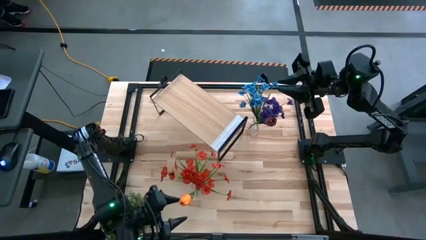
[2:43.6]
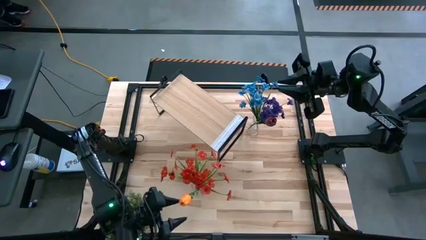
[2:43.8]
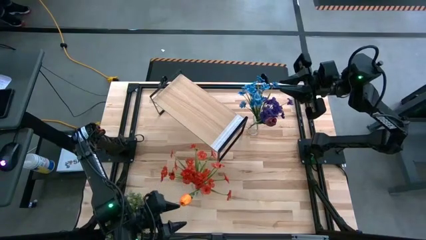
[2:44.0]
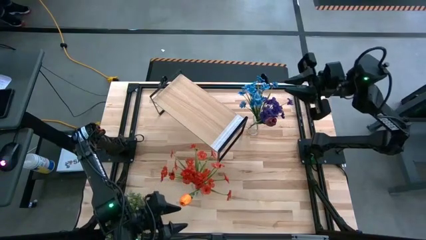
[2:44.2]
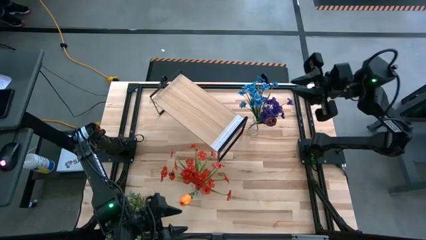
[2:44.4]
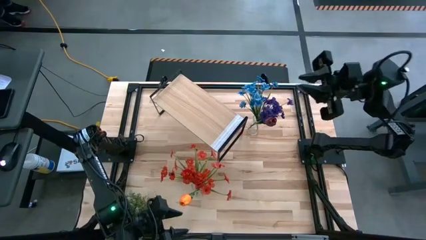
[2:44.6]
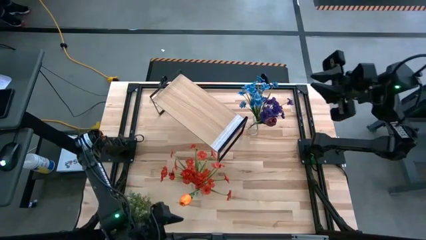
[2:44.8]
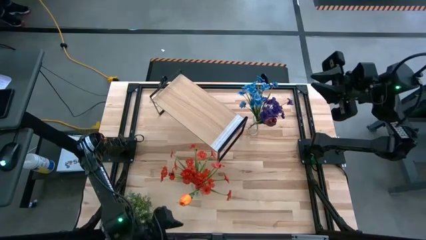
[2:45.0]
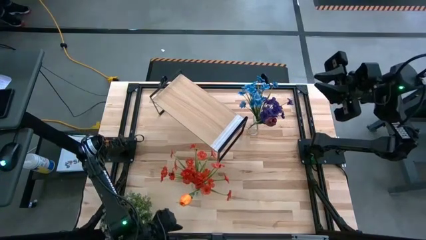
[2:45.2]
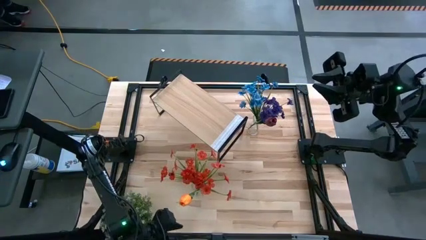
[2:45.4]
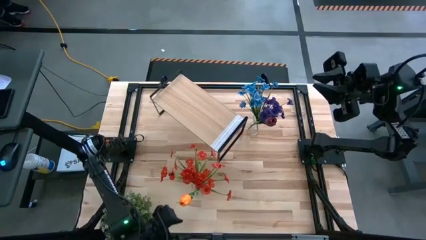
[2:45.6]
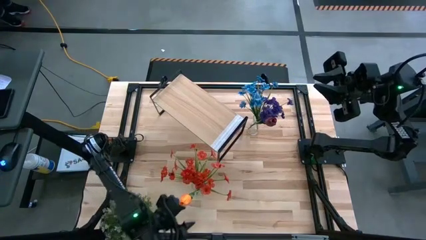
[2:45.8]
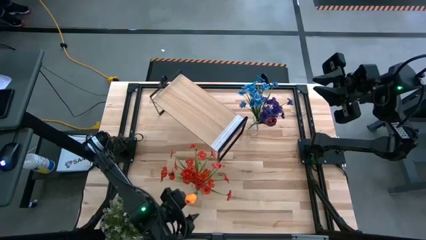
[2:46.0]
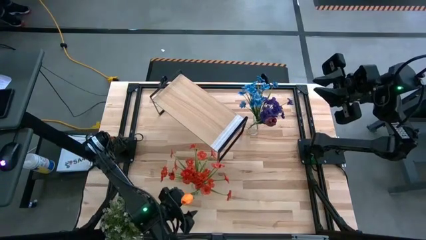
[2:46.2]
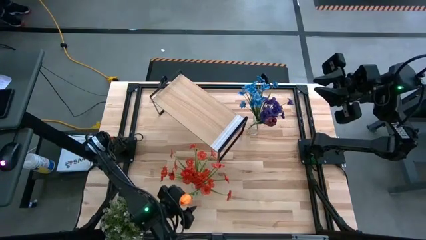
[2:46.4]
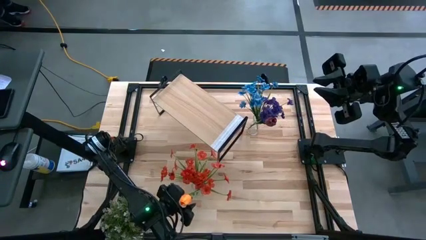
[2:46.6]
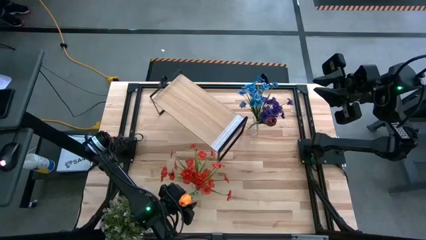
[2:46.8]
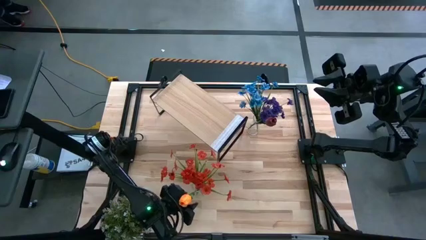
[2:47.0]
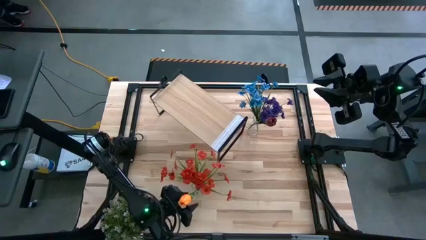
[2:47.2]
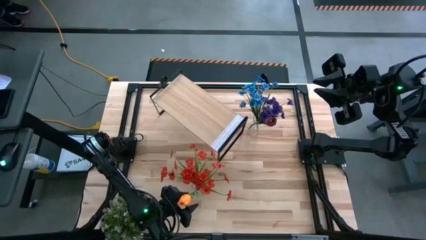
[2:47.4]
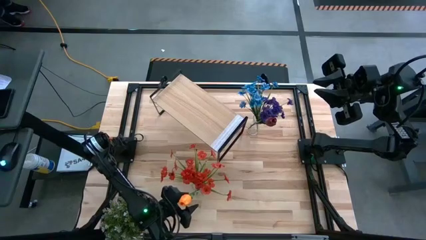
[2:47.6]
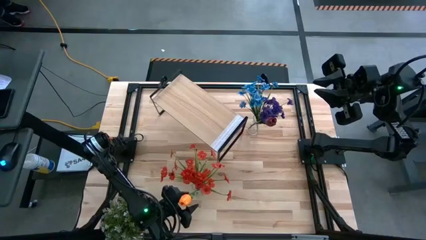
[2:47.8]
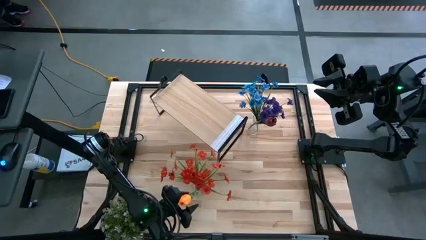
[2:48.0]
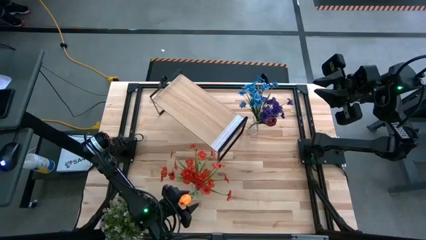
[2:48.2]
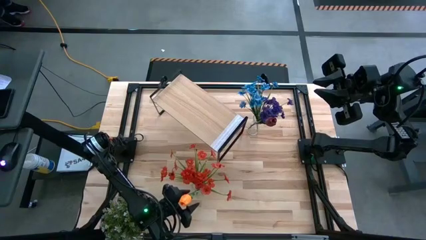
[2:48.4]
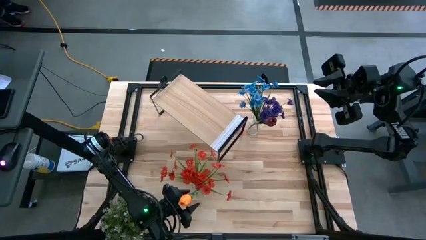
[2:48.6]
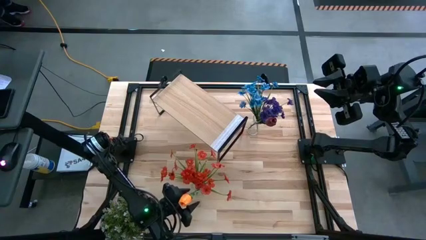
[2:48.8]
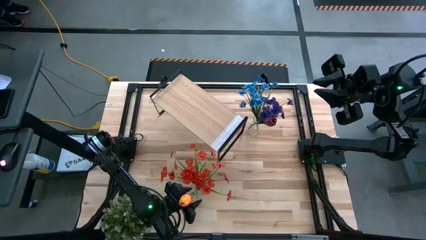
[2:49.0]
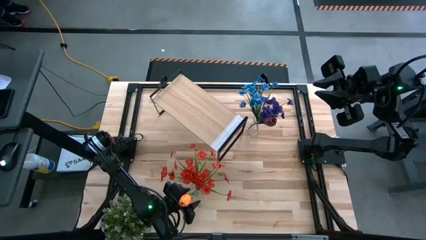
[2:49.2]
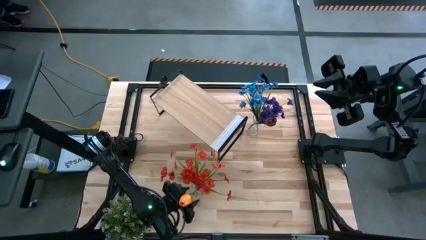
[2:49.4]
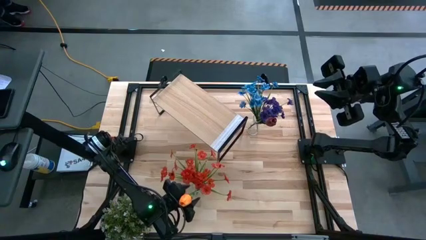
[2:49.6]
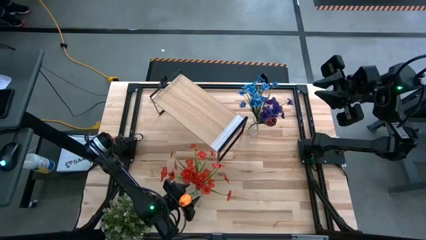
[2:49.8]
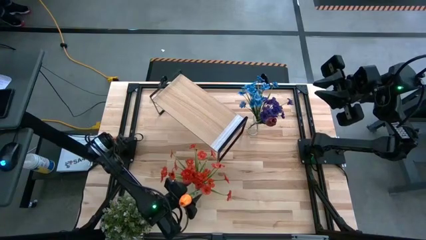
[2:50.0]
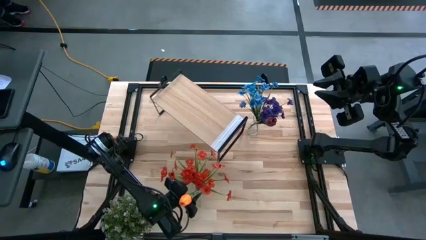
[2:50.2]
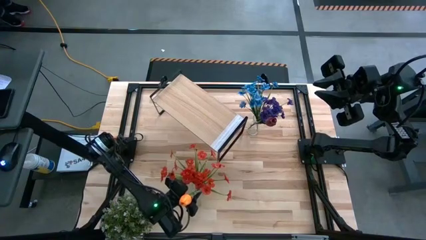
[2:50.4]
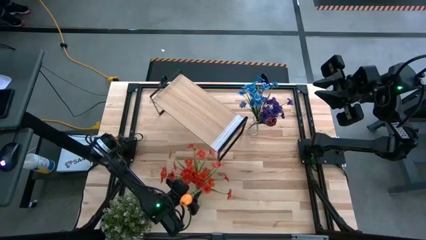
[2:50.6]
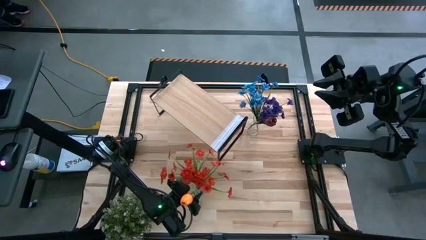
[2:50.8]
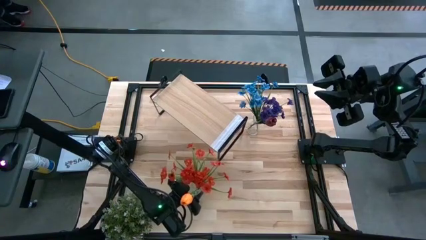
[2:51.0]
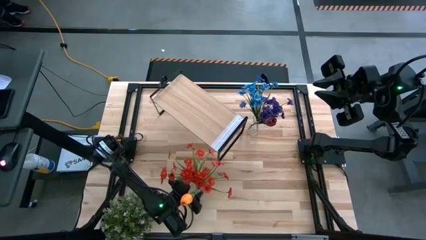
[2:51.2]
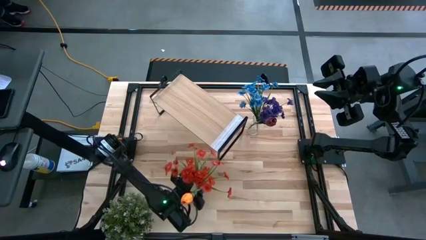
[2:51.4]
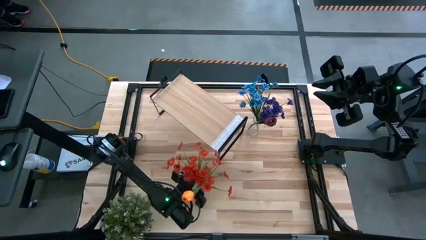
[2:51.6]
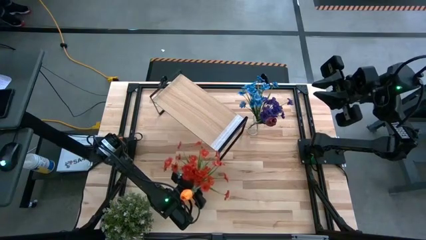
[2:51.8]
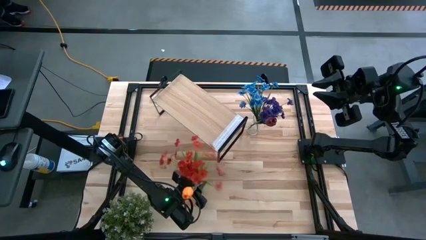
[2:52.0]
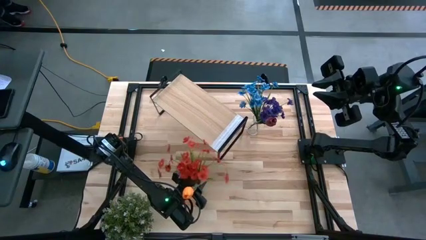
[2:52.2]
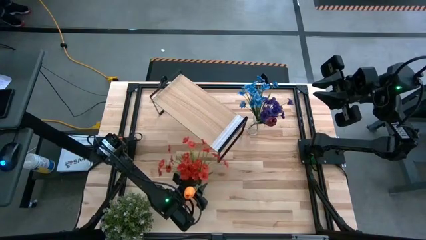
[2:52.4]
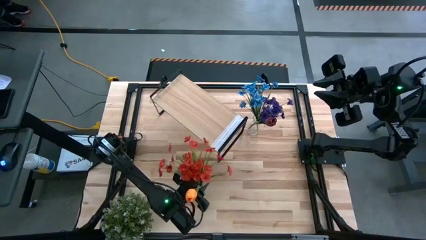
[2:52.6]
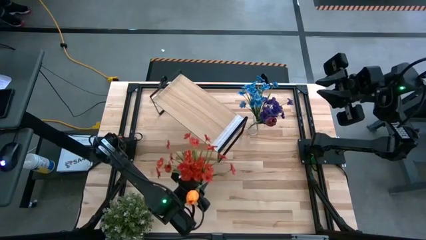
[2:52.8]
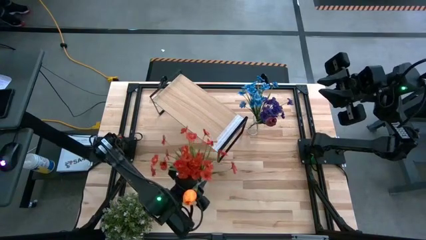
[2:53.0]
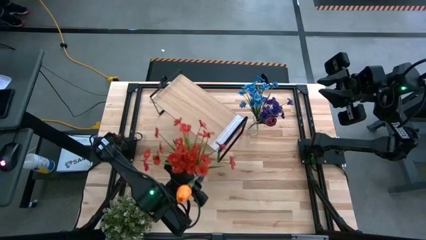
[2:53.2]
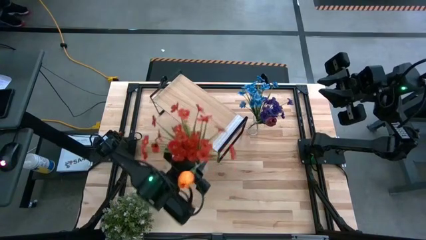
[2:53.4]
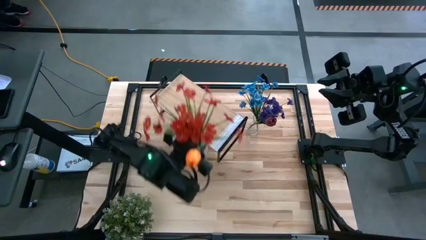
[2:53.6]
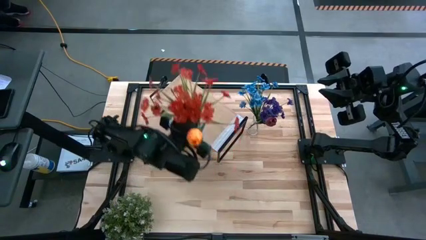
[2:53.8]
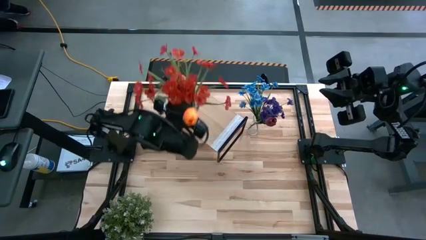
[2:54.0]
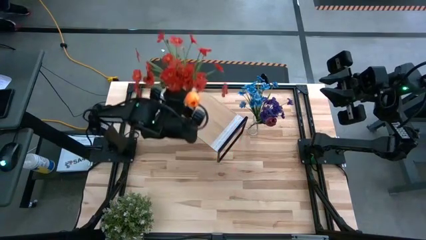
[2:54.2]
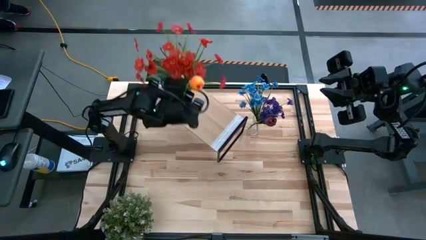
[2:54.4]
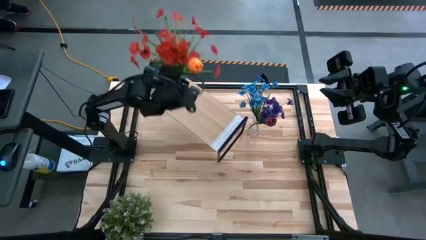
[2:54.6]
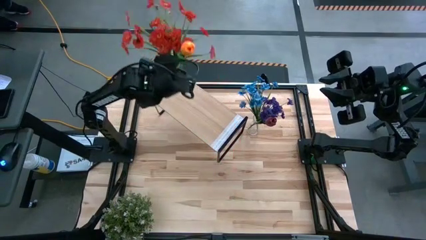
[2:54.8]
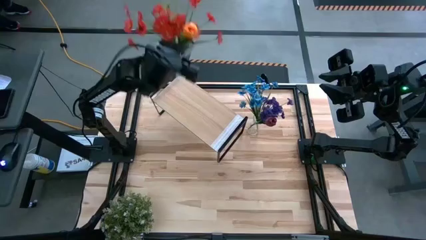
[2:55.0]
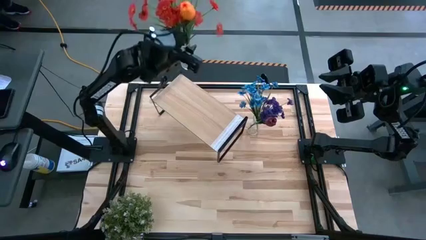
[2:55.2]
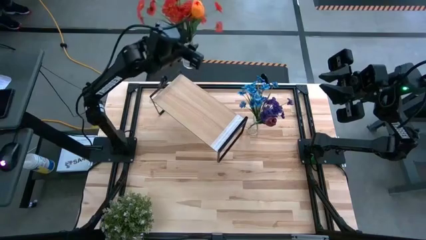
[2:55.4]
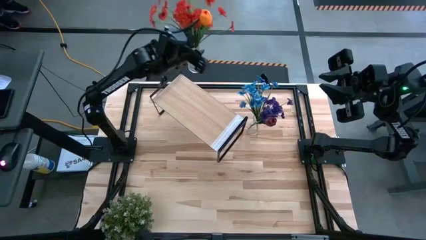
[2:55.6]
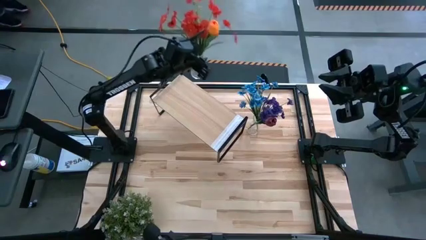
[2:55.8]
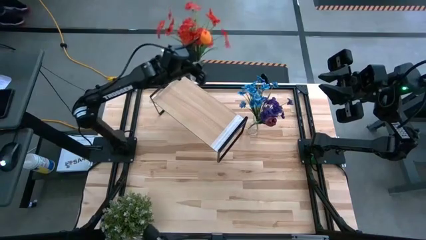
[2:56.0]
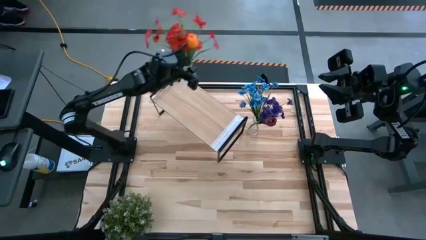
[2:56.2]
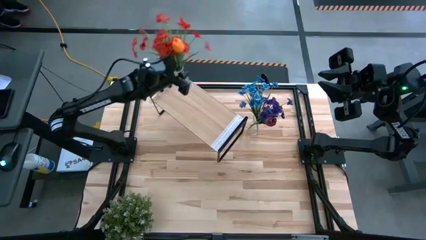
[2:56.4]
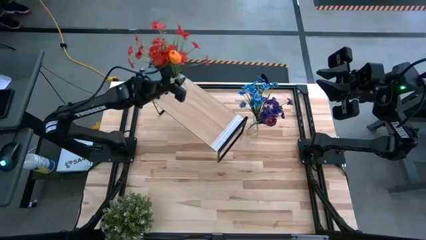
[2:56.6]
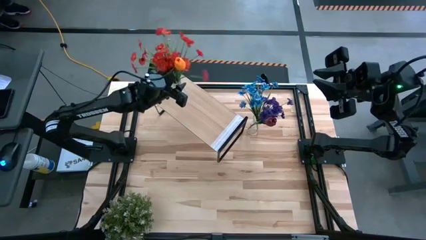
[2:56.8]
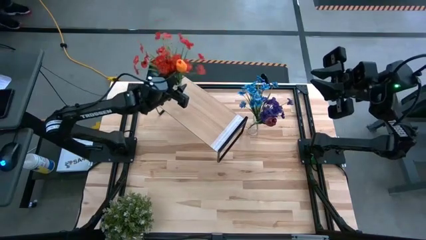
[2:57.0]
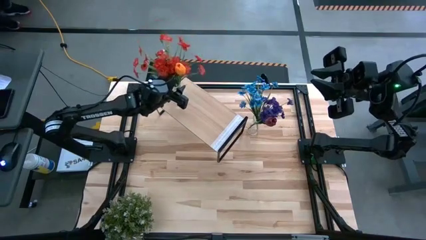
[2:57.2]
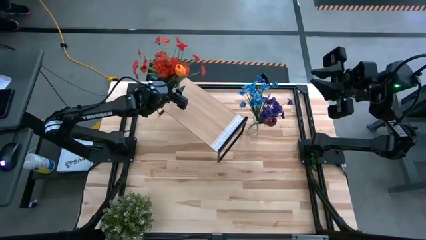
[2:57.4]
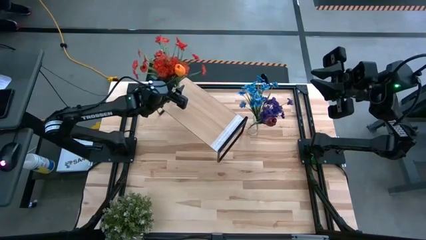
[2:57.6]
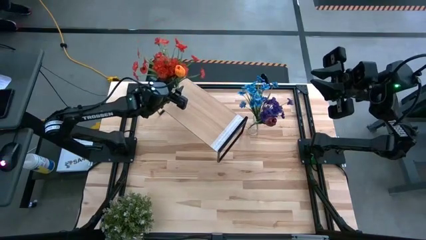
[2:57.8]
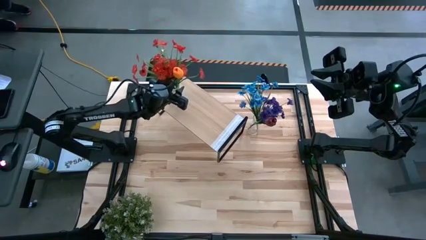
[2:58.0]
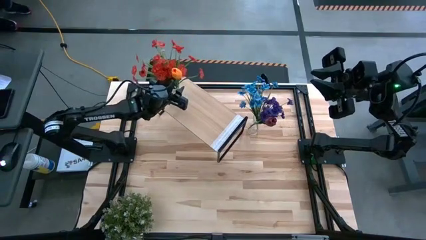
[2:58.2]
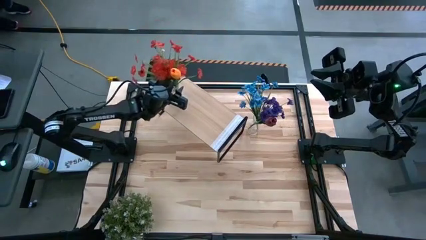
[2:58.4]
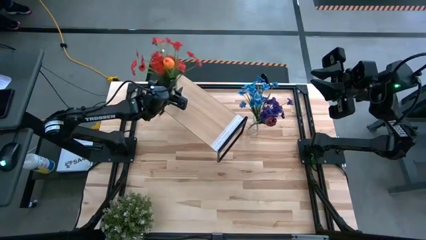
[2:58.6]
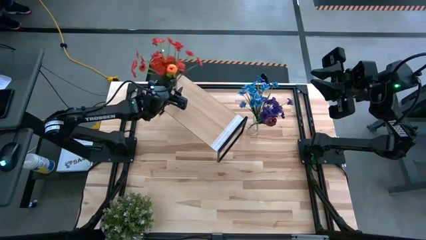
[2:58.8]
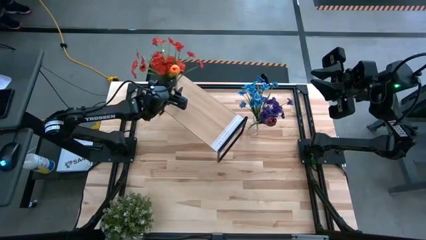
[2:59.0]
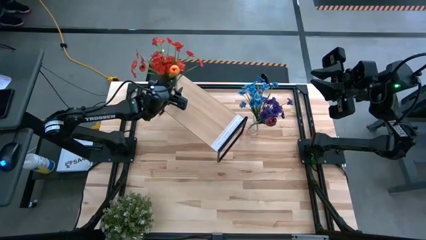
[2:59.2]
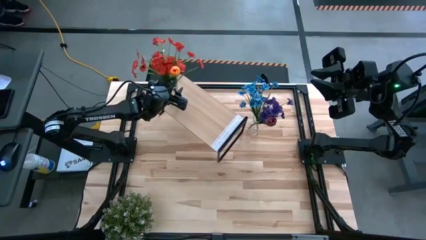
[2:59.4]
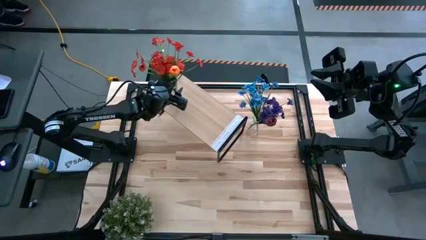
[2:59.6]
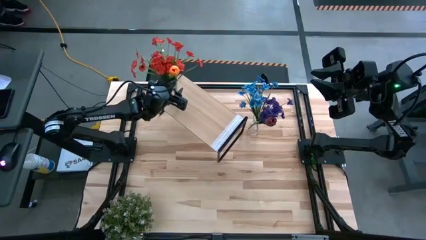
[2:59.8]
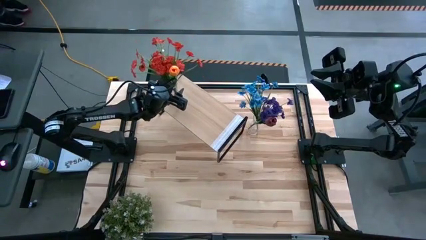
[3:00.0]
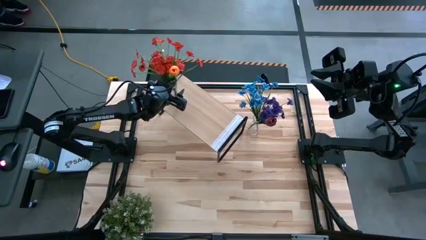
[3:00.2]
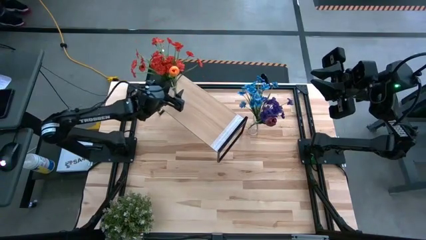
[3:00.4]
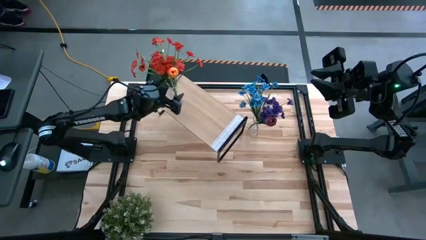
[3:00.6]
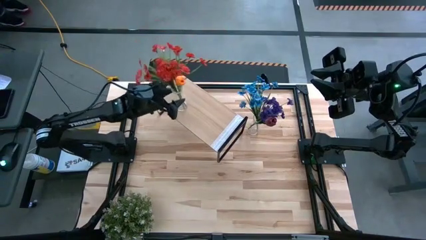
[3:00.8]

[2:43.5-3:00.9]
Task: Pick and place flowers into a vace then onto a shelf
Put the bottom transparent vase on the shelf

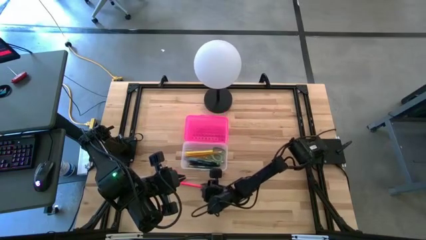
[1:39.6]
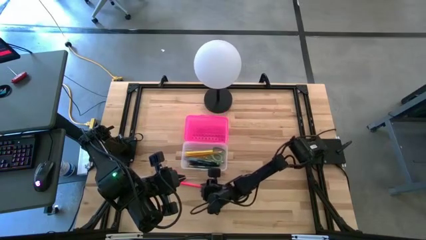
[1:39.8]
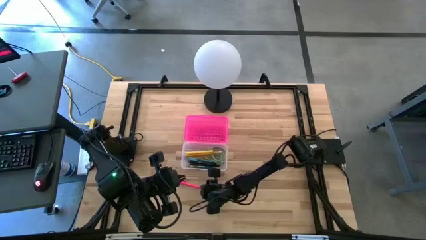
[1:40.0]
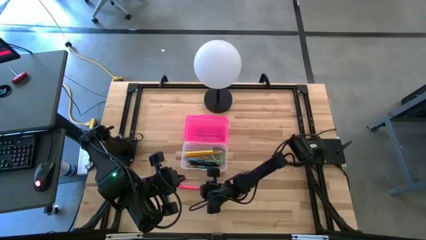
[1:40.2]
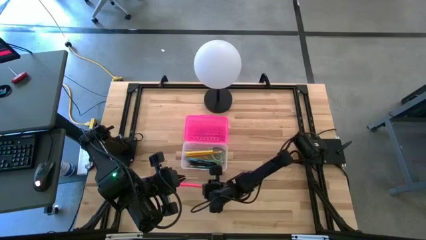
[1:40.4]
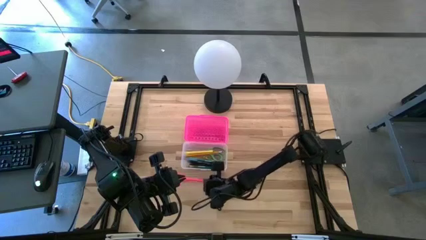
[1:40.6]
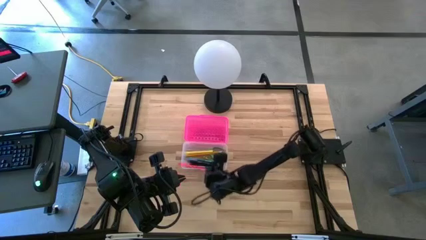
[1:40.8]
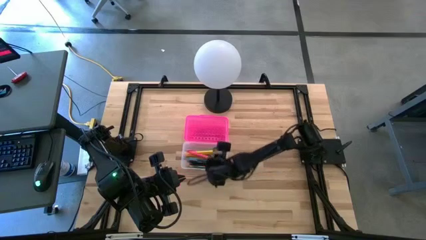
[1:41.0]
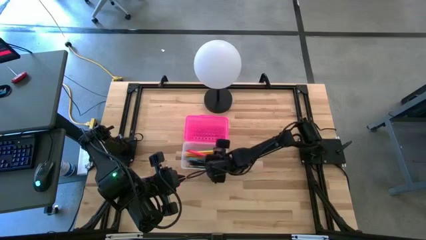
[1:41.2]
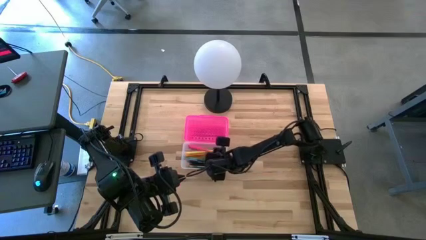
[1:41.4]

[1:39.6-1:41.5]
Task: Pick & place school supplies into a supply box
Put the pink pen into the pink supply box
